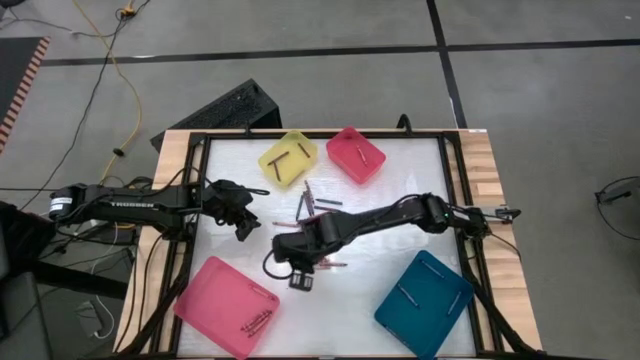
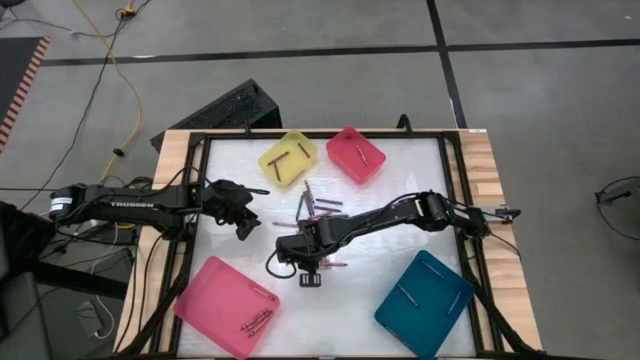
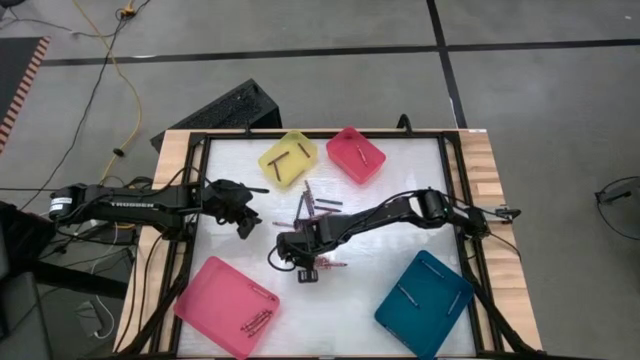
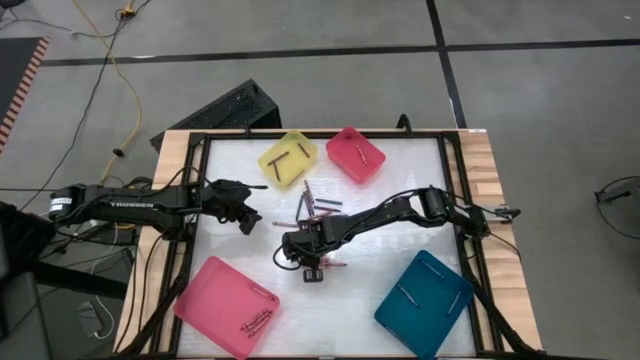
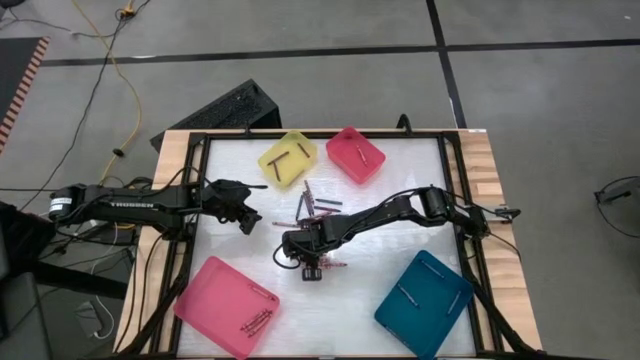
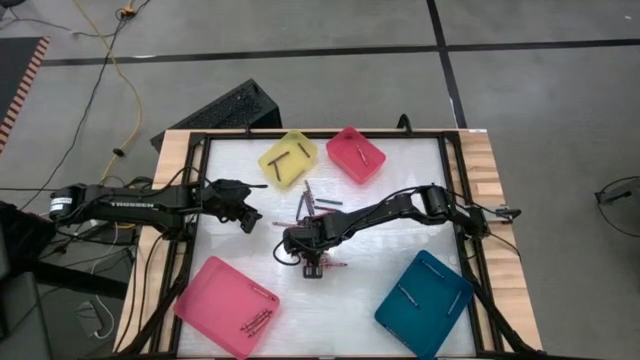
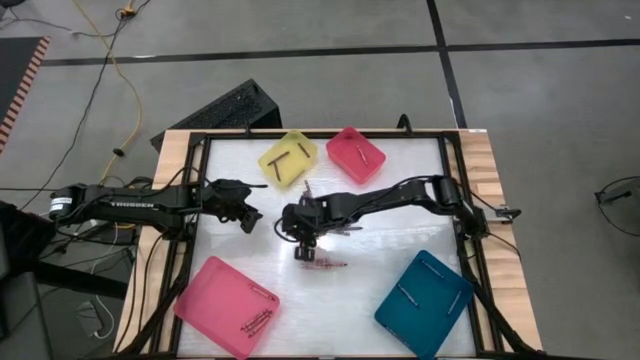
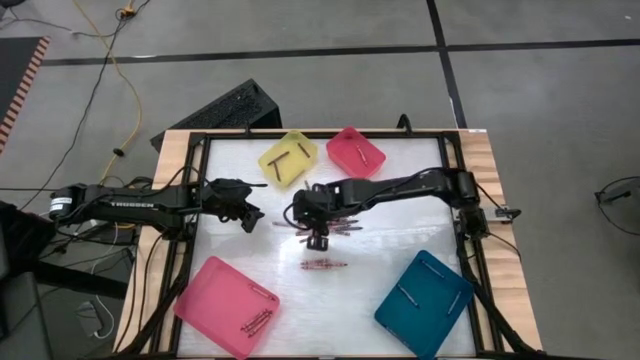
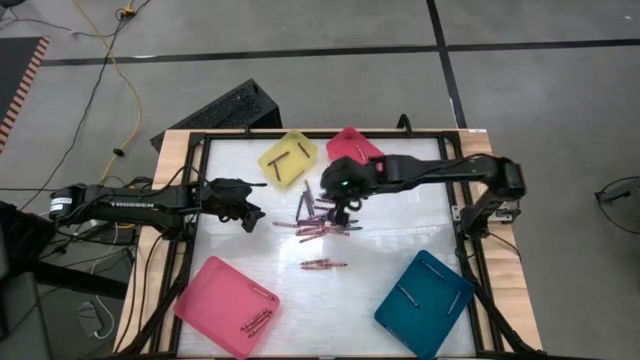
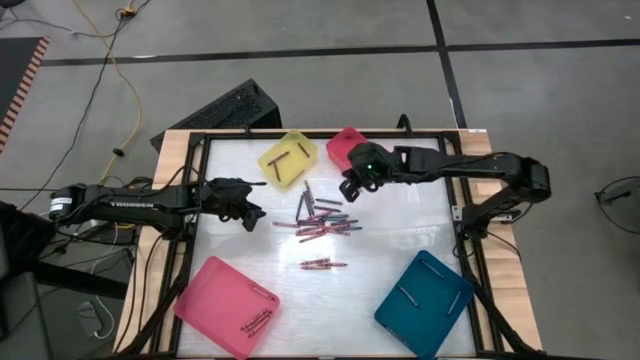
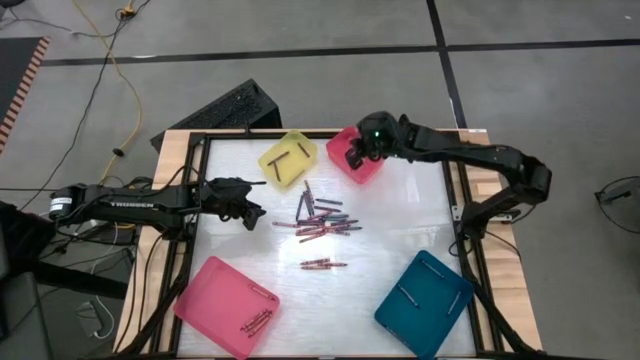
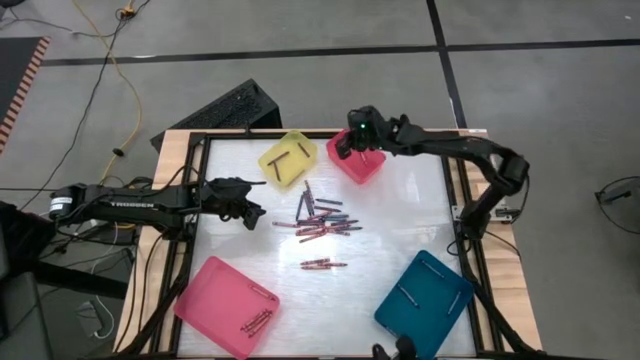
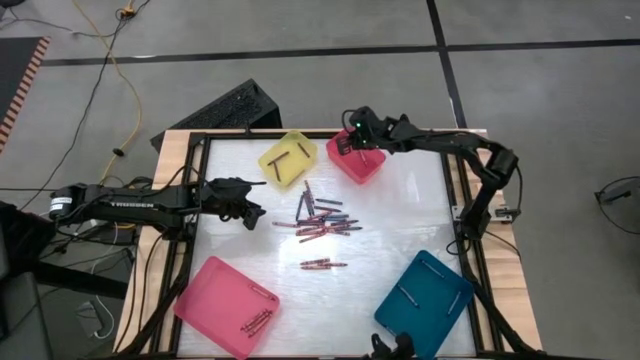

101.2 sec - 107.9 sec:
Task: Sort crayons
Put the pink crayon into the red bin

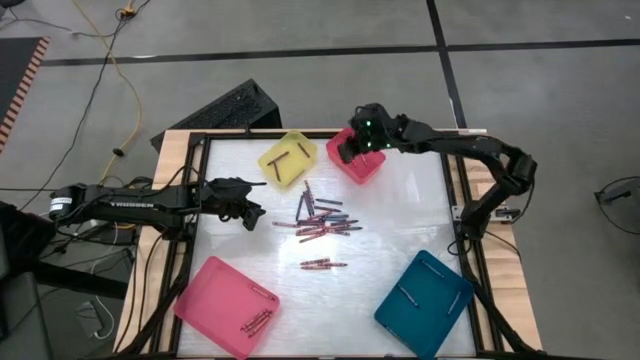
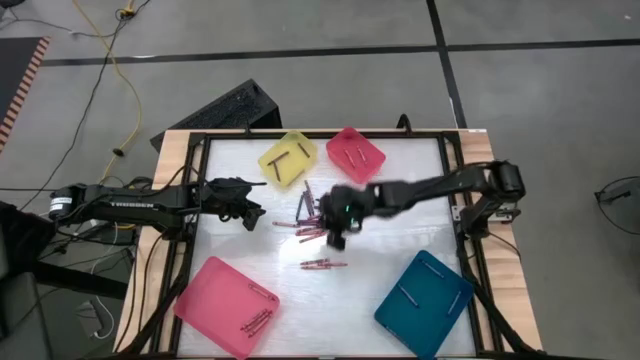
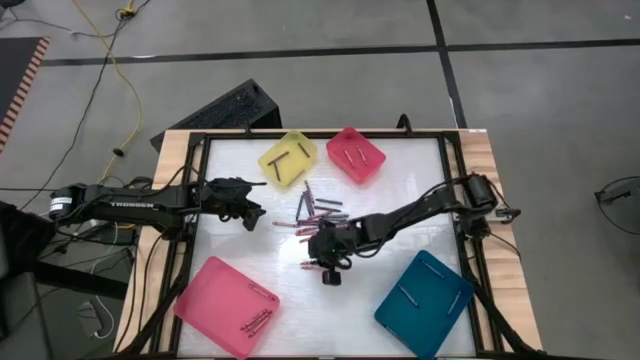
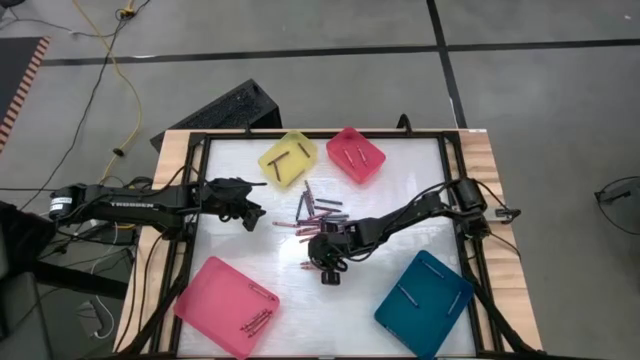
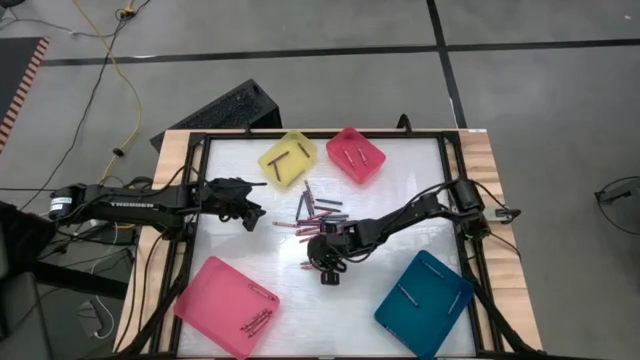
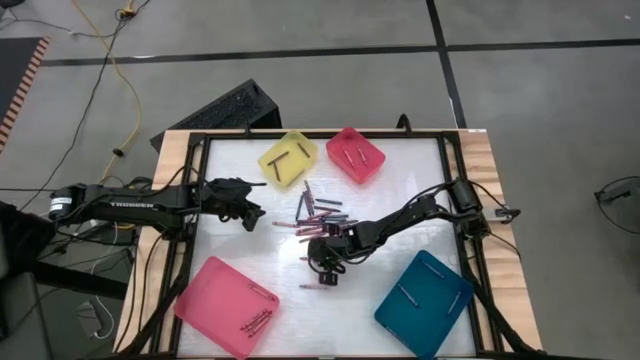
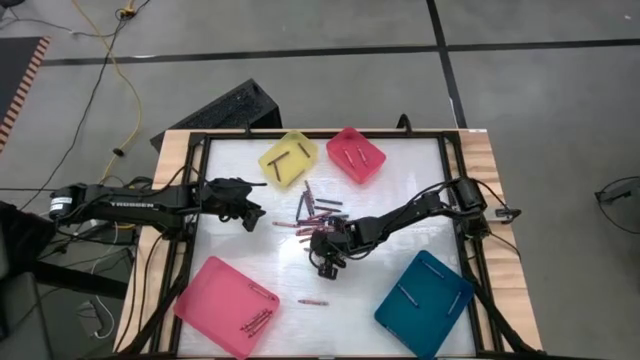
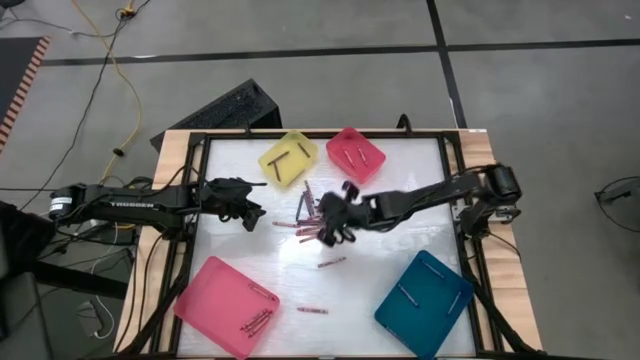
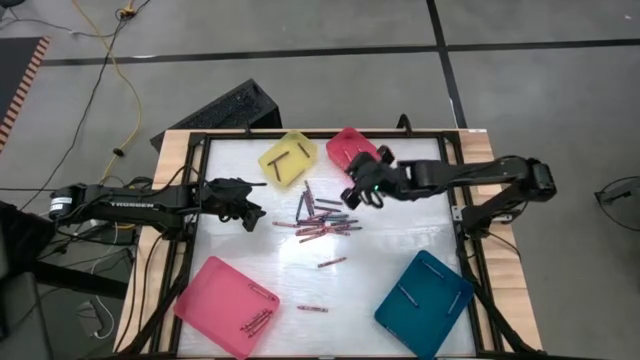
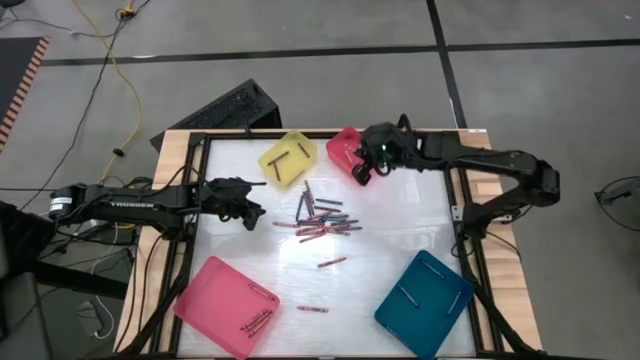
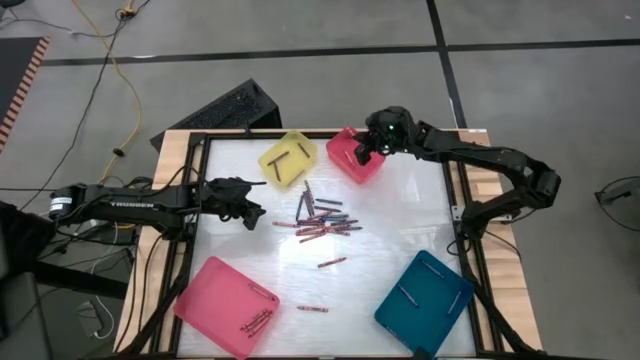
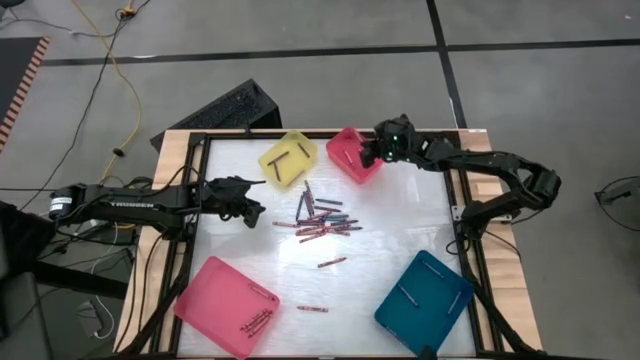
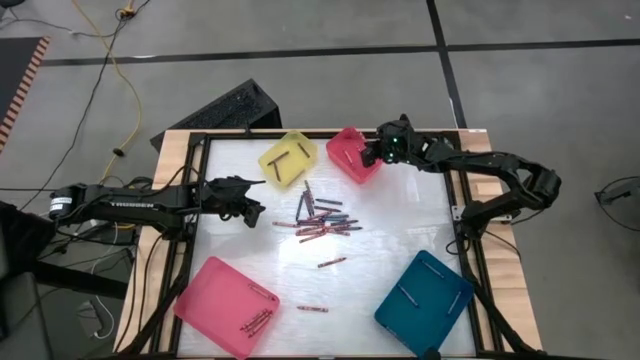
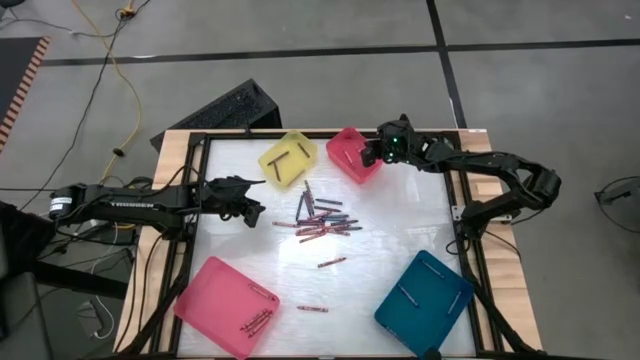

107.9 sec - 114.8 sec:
Put the pink crayon into the red bin

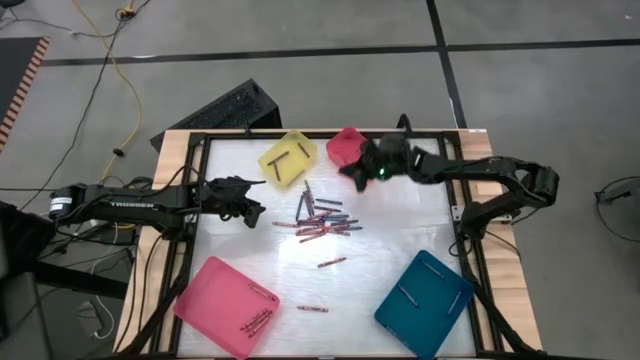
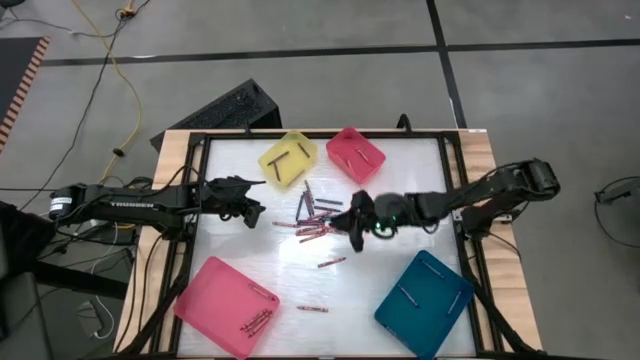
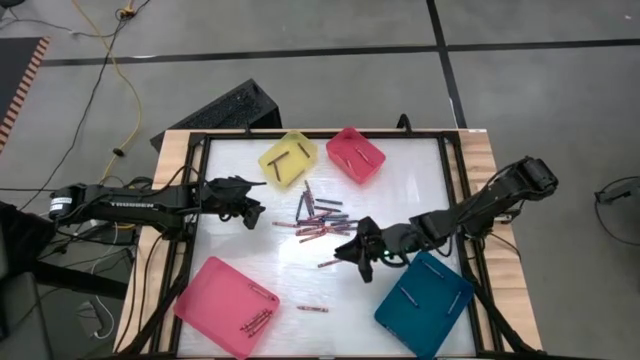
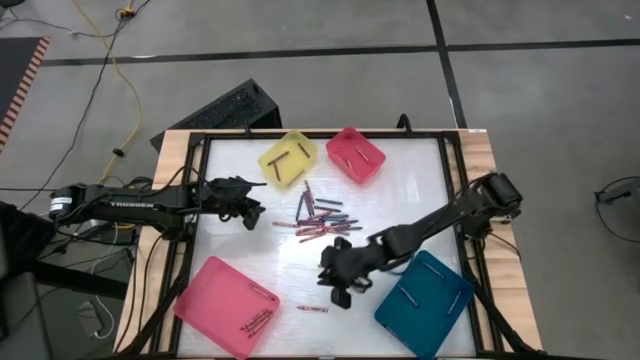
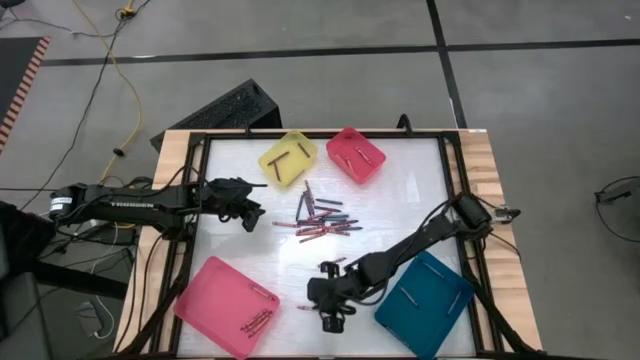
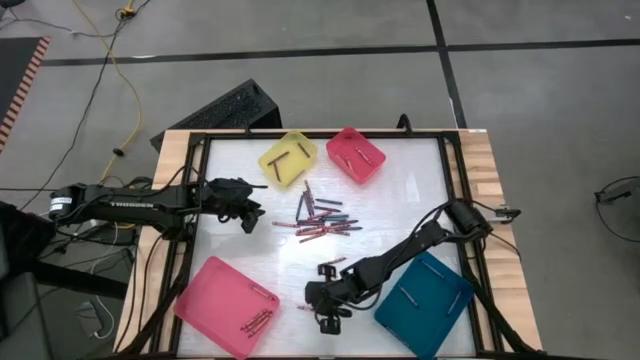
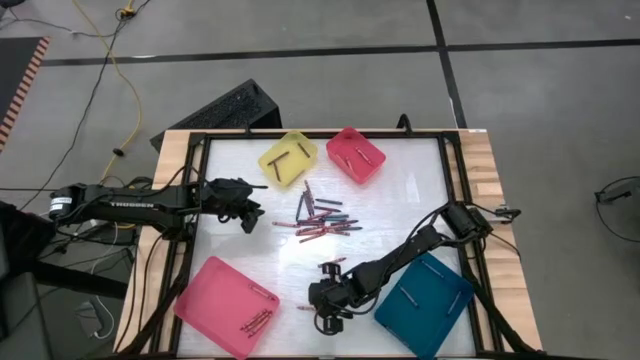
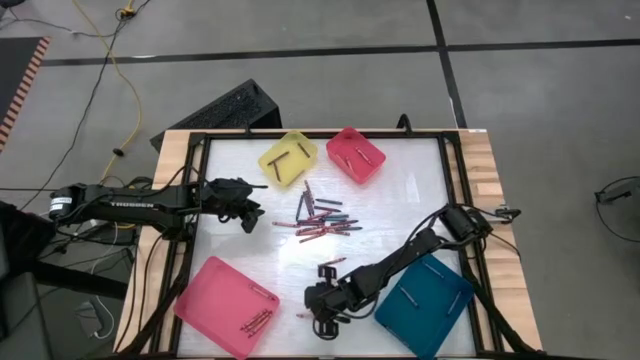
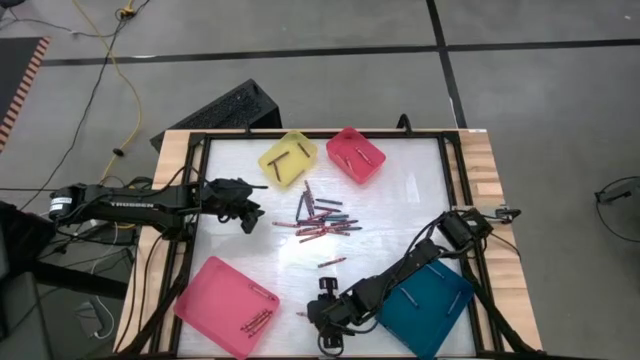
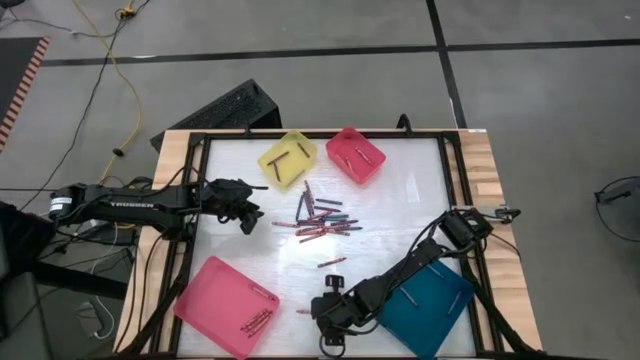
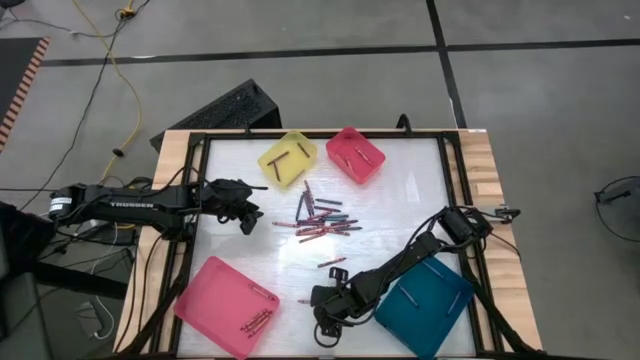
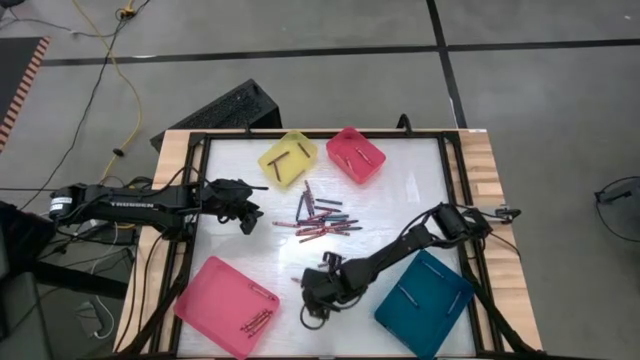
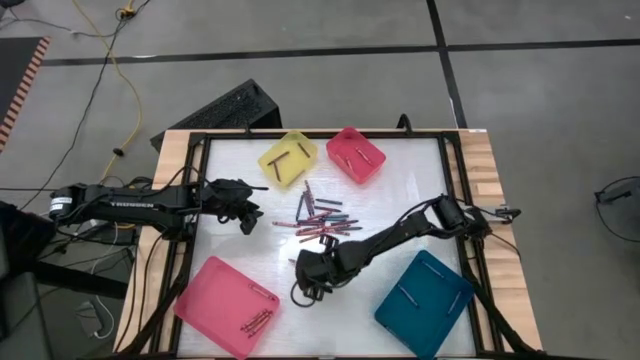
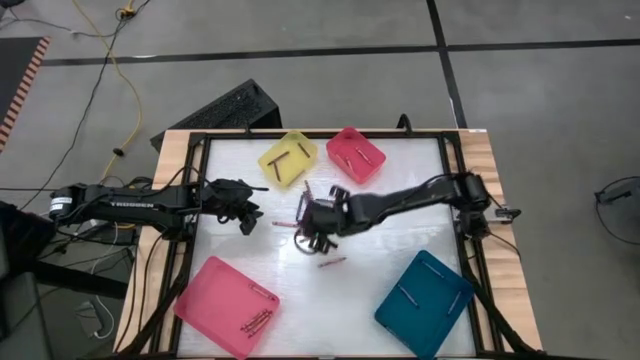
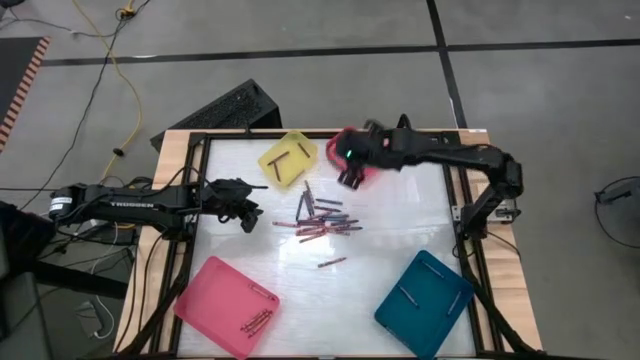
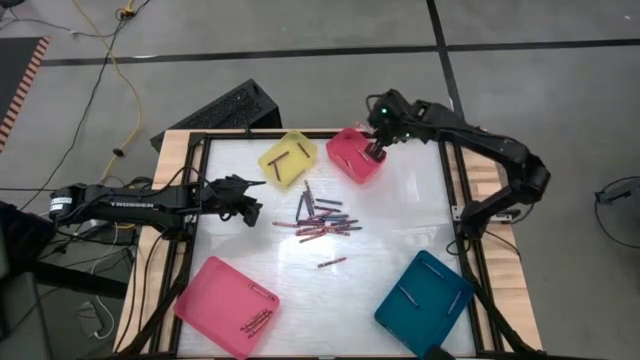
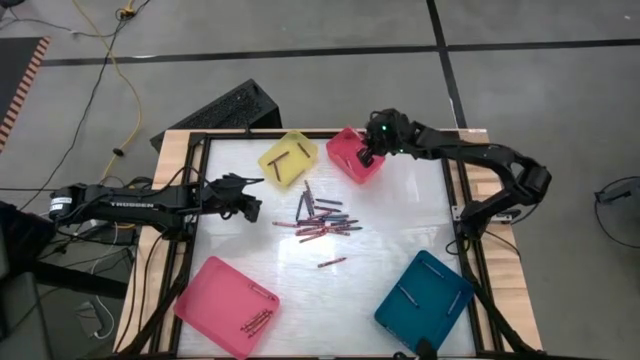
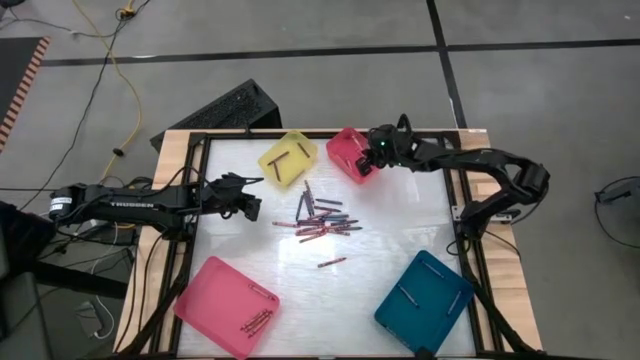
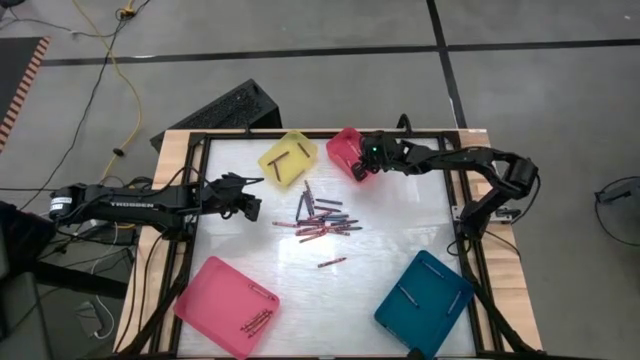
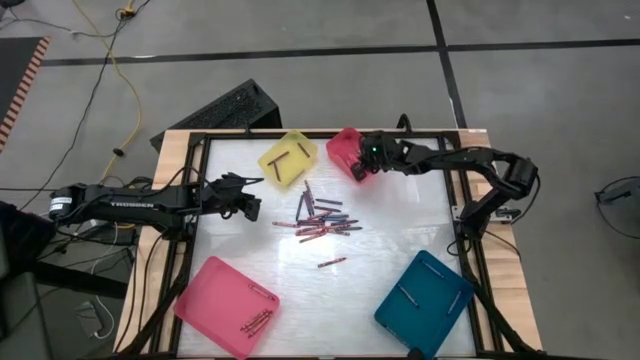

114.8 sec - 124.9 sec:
Put the pink crayon into the red bin
